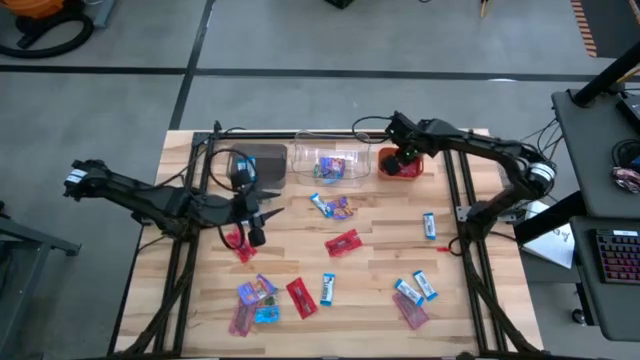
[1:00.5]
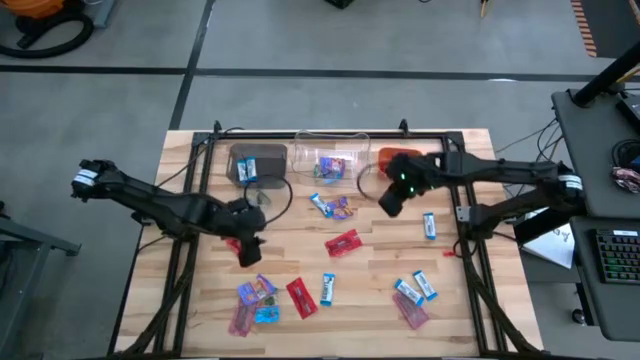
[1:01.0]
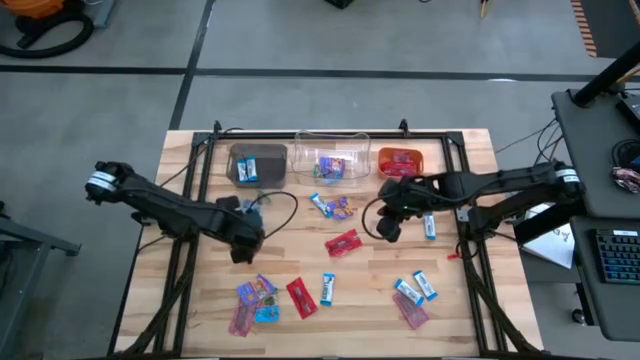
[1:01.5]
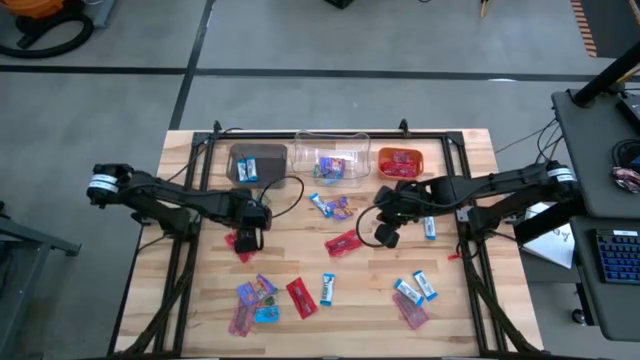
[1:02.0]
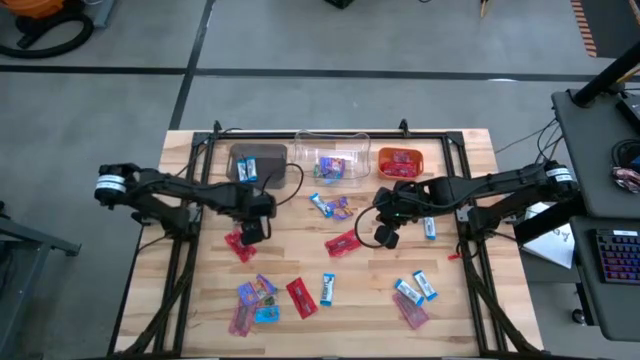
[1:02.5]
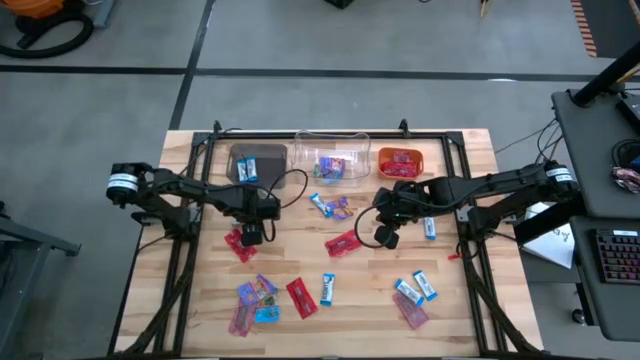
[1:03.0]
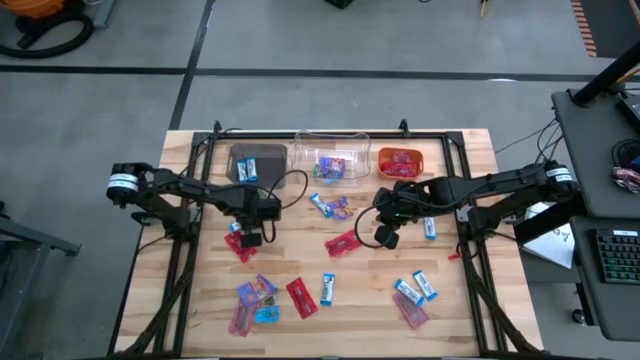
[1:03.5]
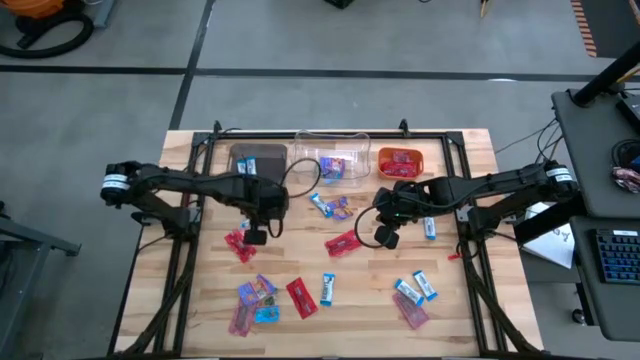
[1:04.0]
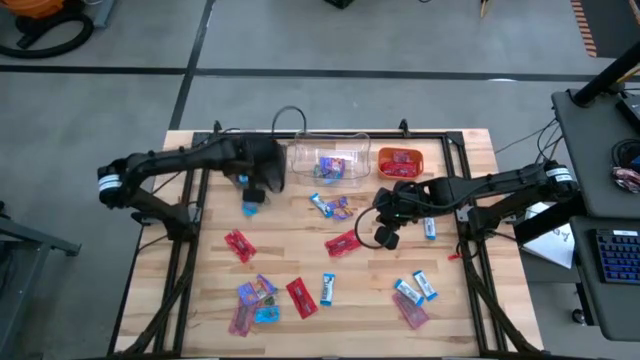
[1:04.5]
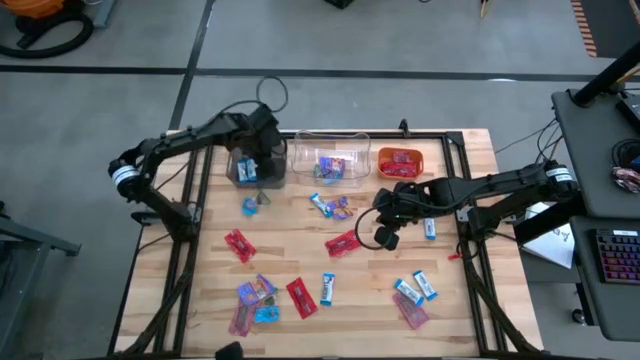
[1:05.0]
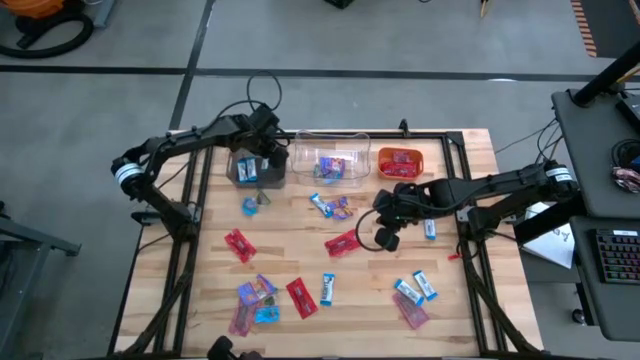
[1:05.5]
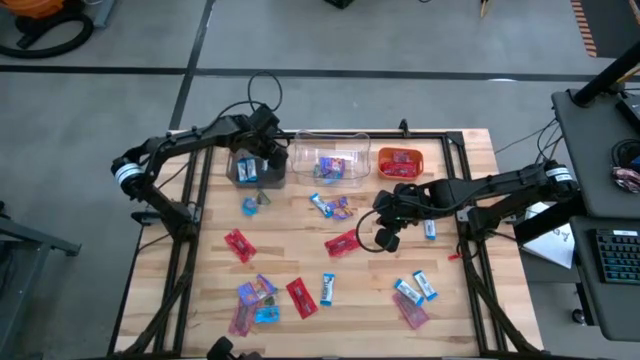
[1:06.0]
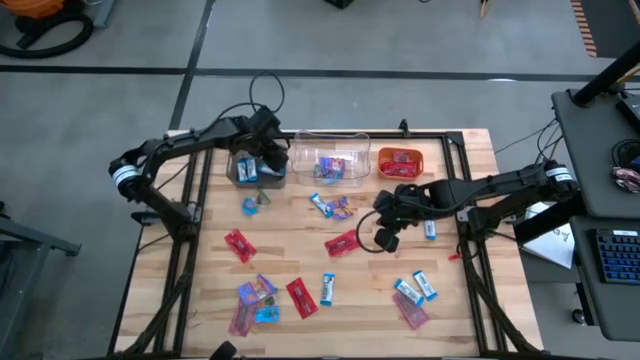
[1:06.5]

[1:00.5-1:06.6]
Task: Sort candy
Put the white candy into the black bin

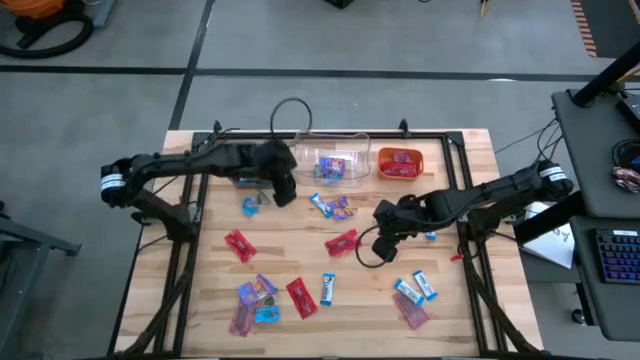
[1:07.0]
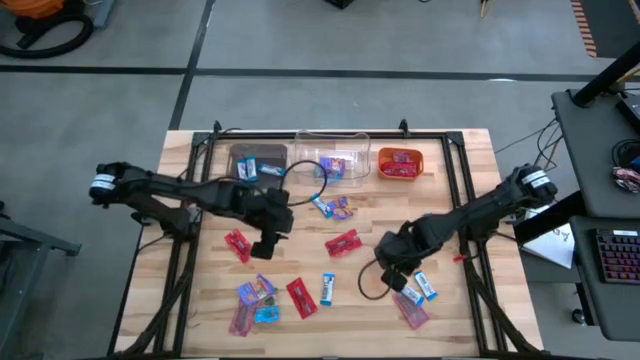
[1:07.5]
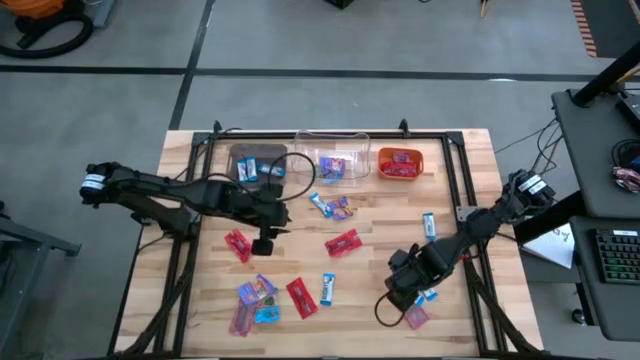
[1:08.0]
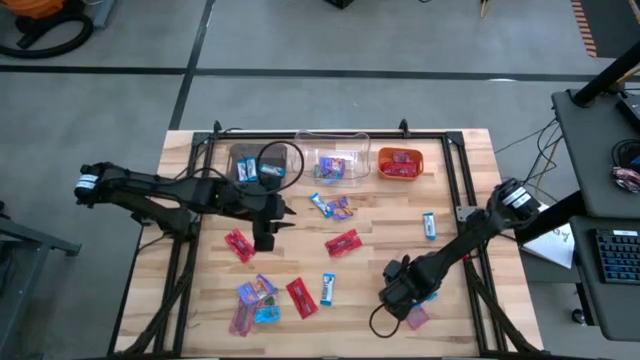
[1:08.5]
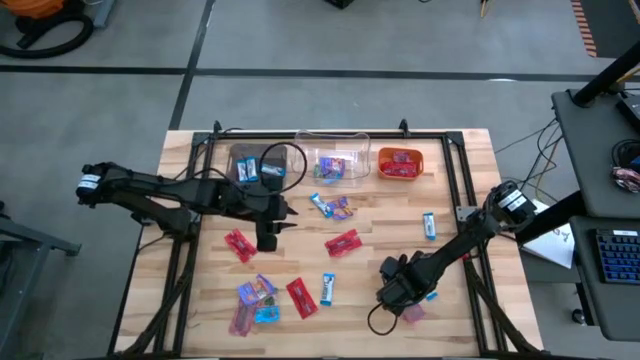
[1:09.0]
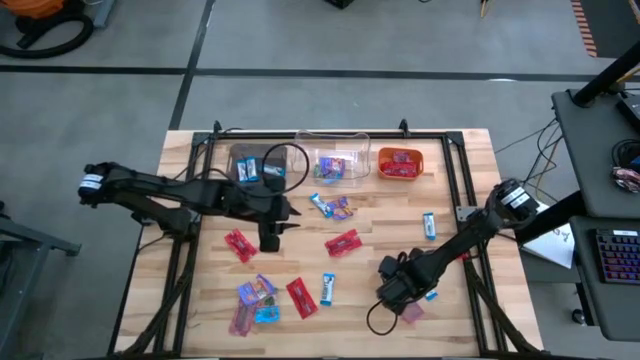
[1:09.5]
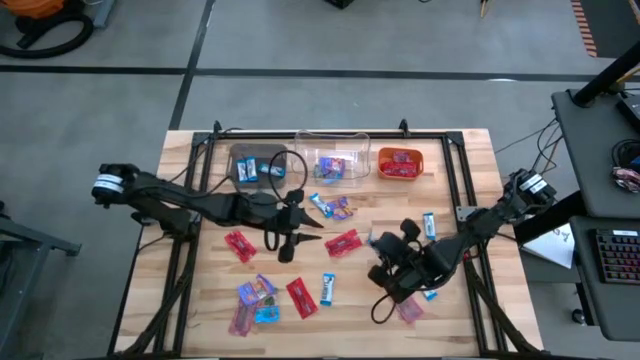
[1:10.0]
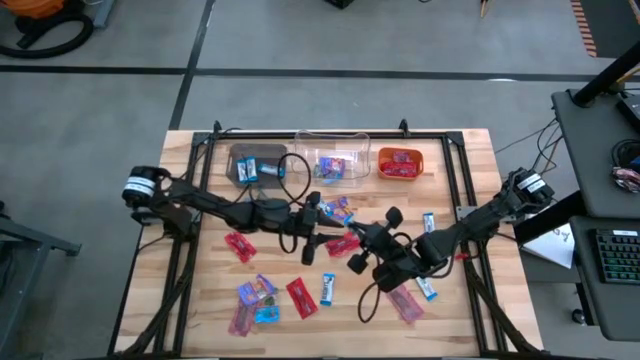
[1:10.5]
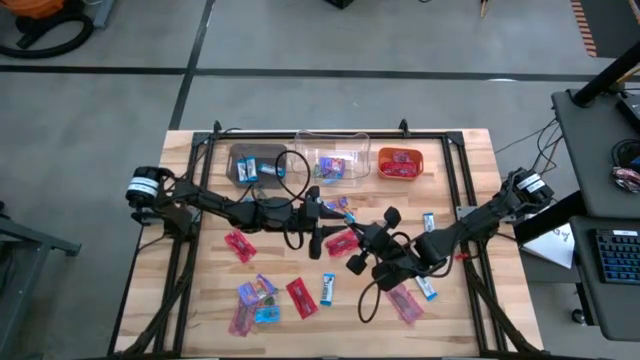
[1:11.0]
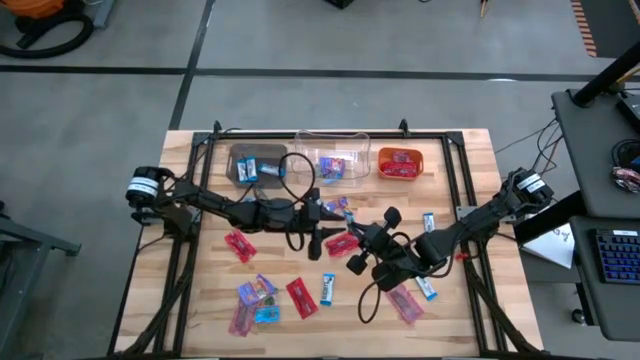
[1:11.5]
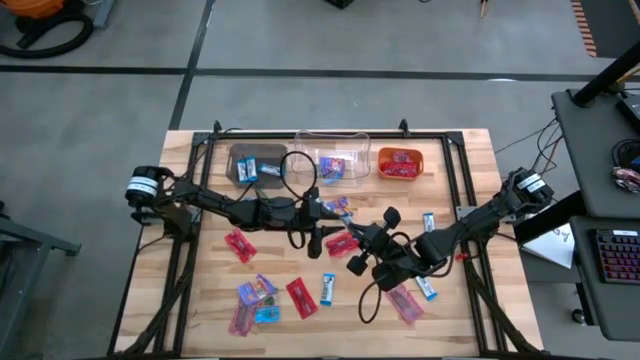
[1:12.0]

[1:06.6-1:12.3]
Put the white candy into the black bin

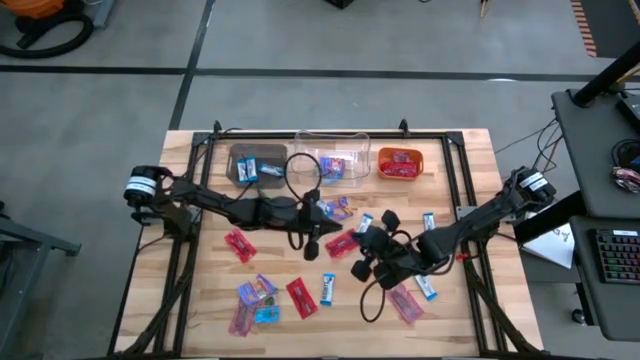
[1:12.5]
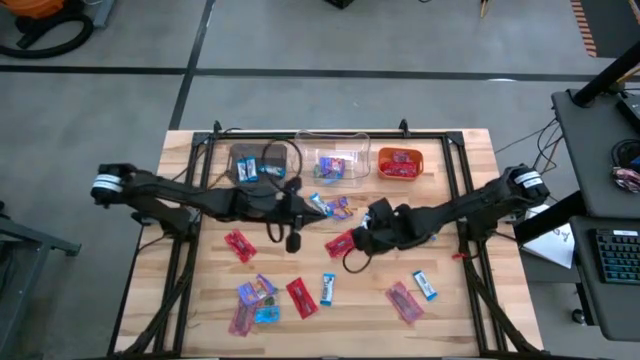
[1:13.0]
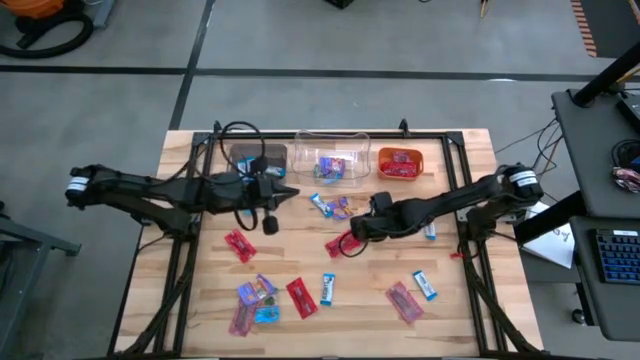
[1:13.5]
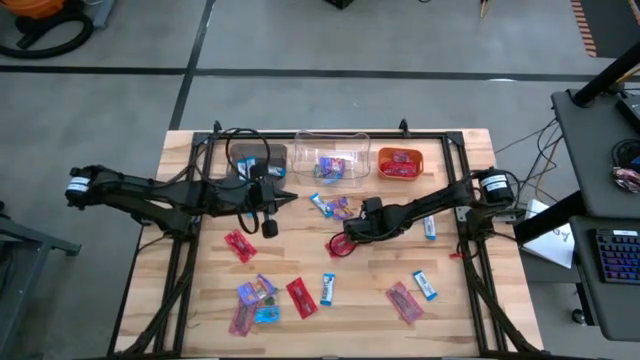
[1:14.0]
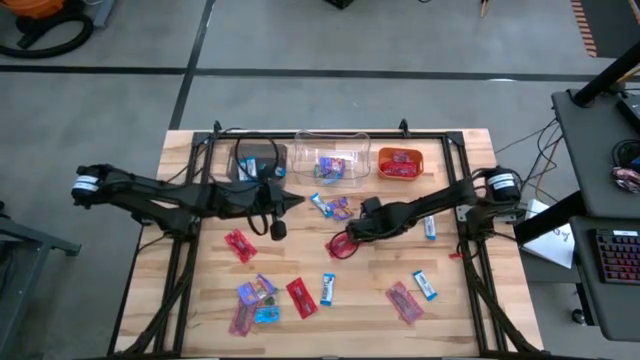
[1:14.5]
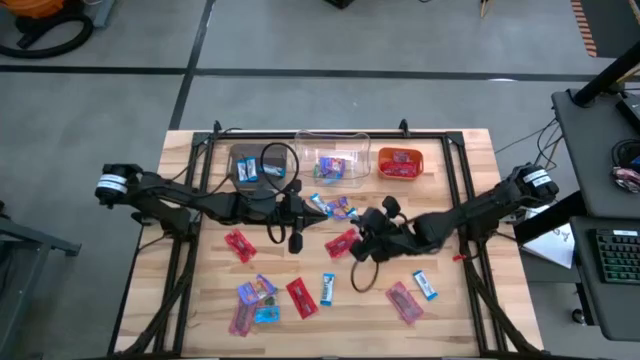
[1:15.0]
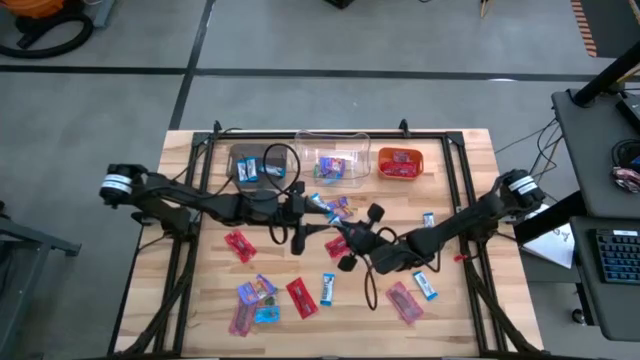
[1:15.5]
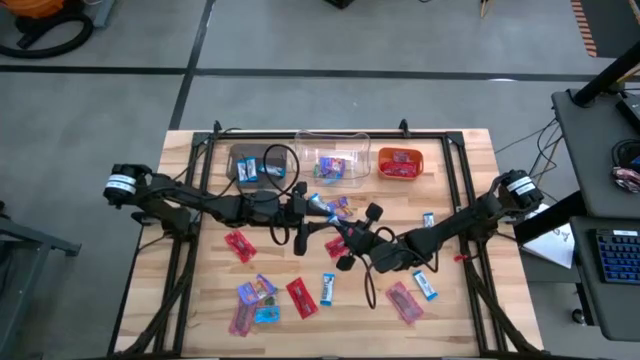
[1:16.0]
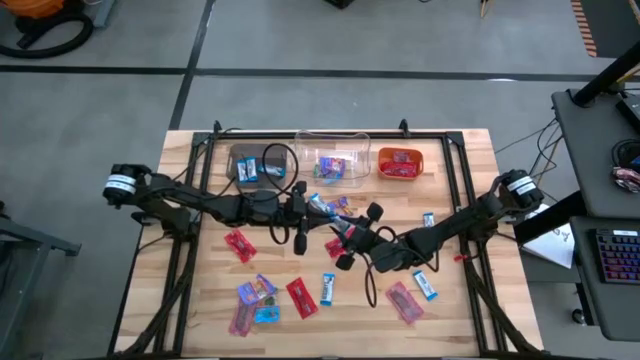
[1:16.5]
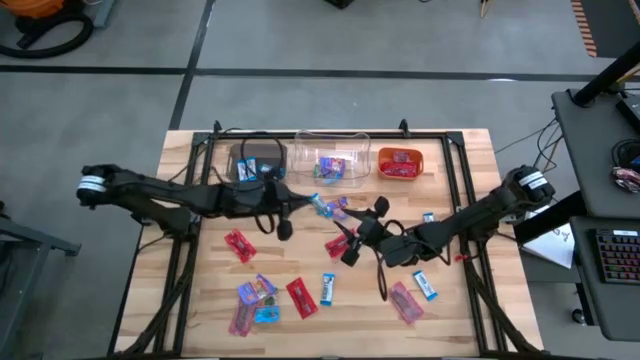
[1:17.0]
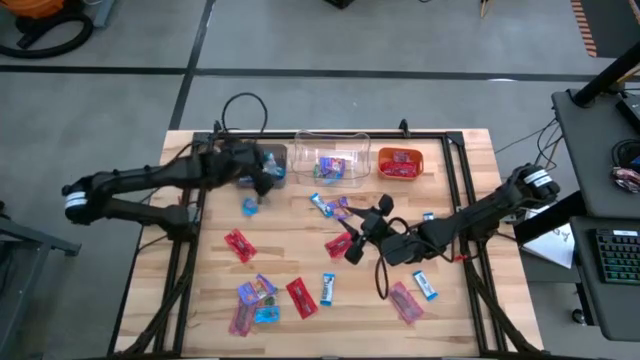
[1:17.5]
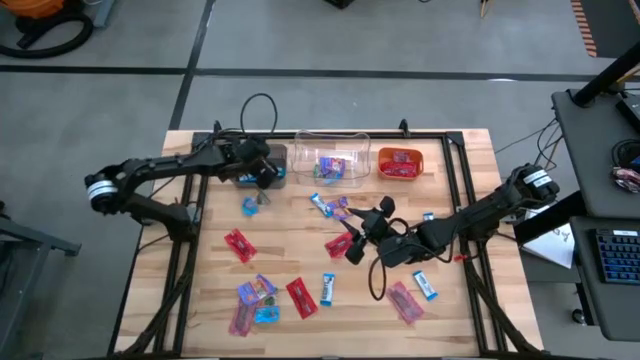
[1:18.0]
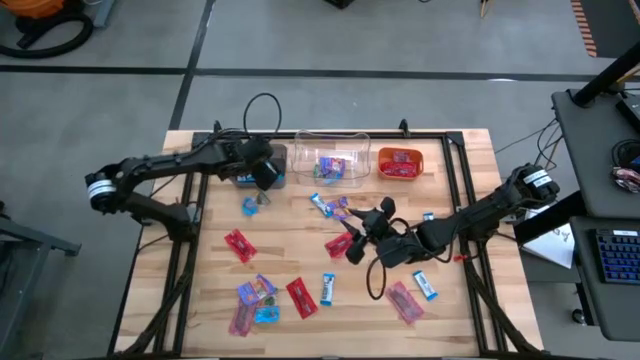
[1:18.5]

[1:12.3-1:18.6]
Put the white candy into the black bin
